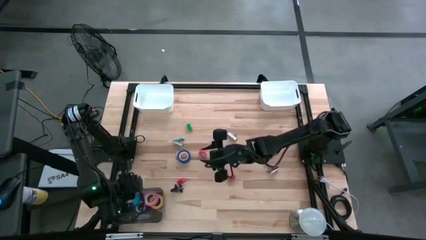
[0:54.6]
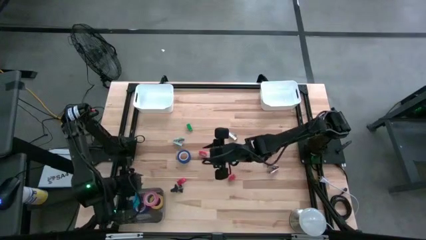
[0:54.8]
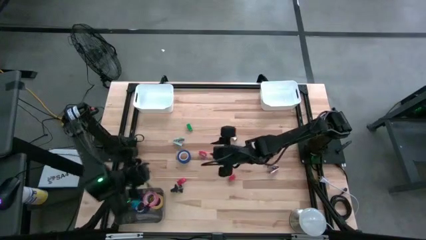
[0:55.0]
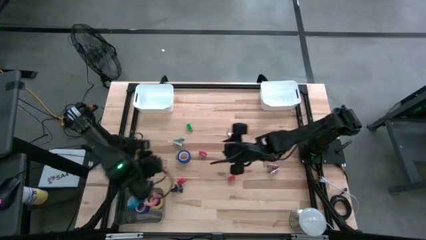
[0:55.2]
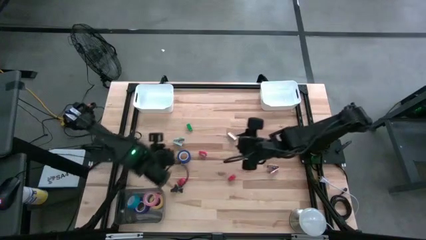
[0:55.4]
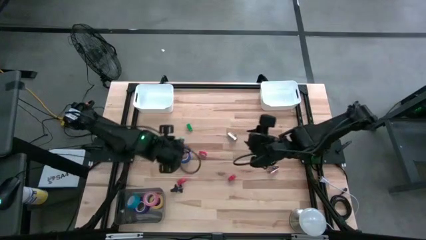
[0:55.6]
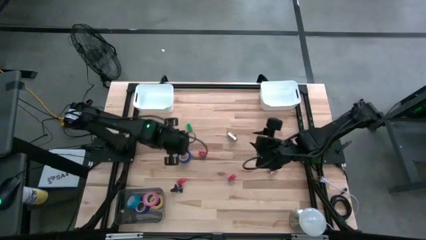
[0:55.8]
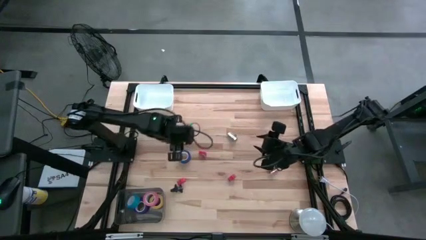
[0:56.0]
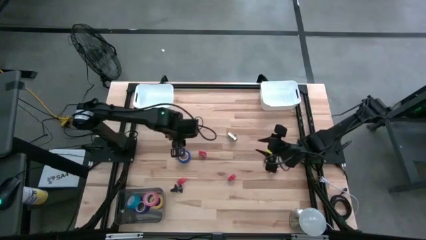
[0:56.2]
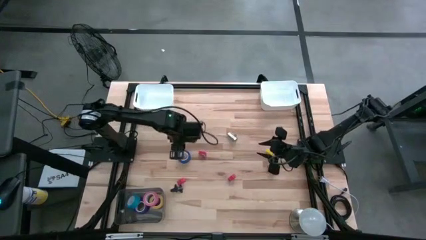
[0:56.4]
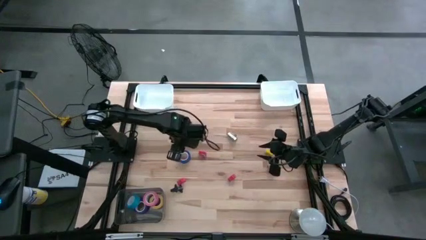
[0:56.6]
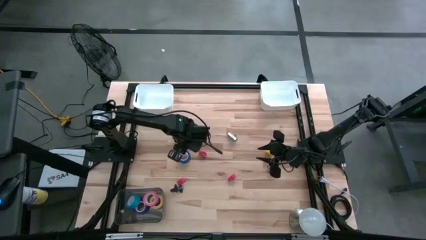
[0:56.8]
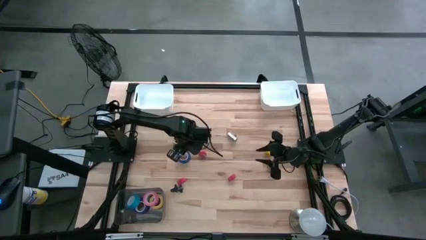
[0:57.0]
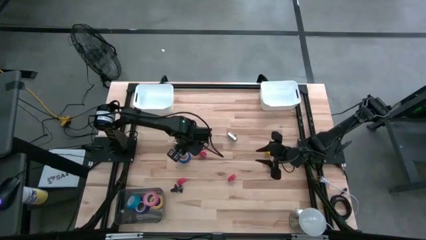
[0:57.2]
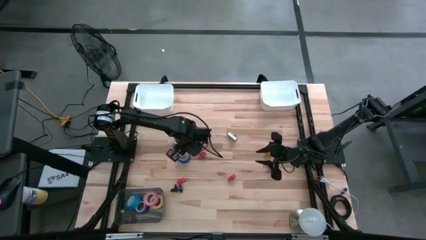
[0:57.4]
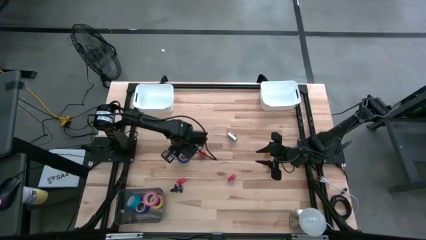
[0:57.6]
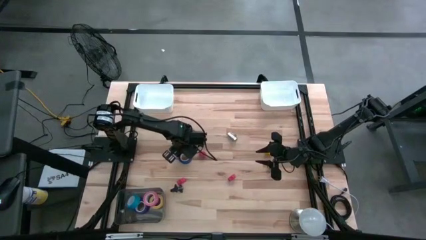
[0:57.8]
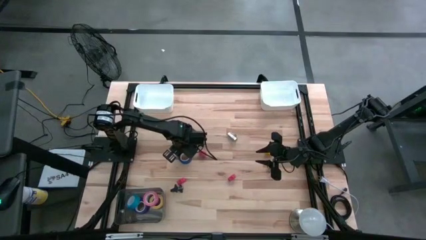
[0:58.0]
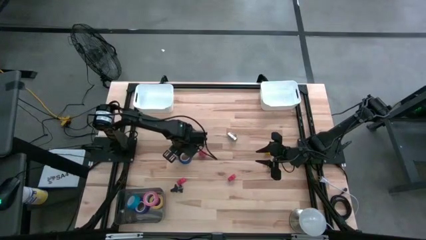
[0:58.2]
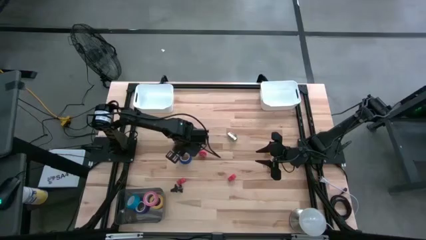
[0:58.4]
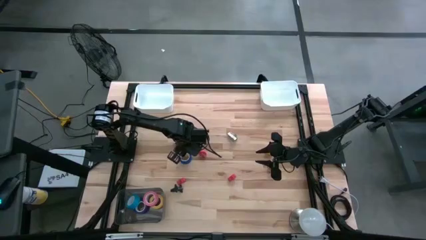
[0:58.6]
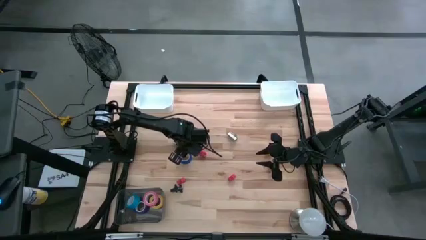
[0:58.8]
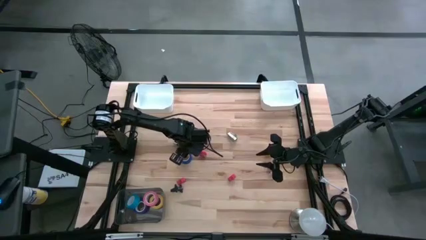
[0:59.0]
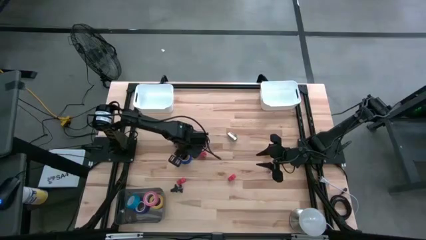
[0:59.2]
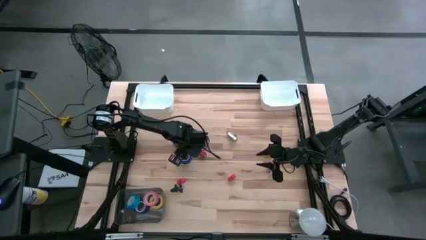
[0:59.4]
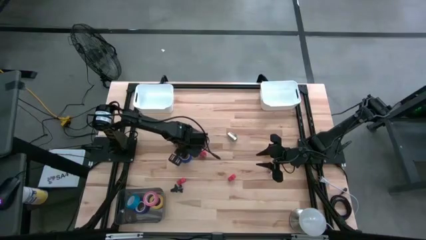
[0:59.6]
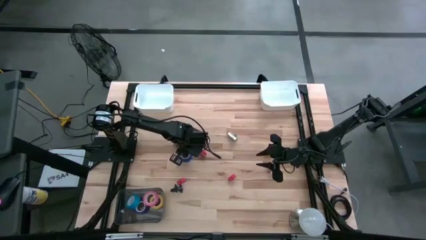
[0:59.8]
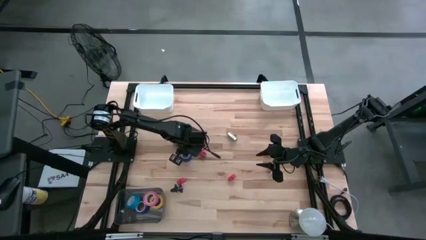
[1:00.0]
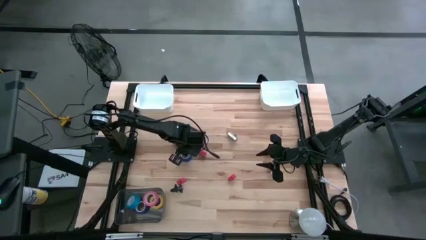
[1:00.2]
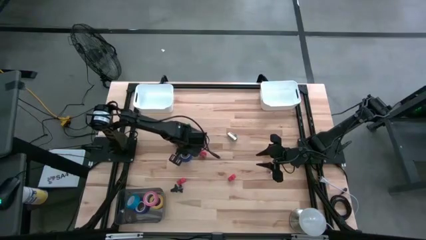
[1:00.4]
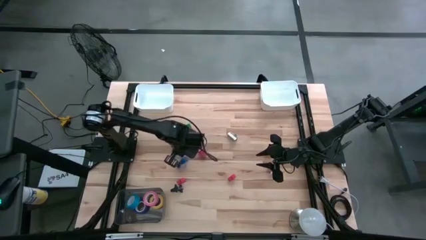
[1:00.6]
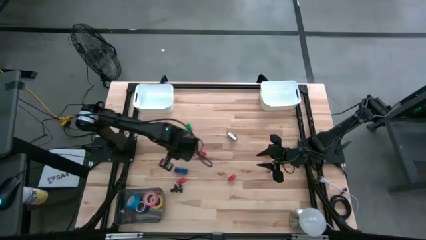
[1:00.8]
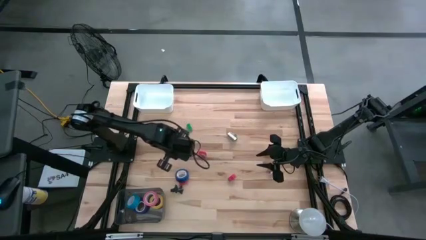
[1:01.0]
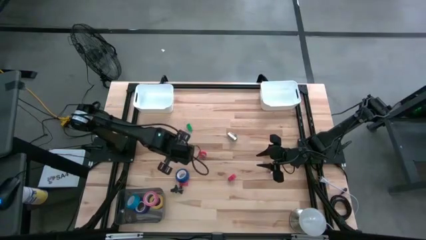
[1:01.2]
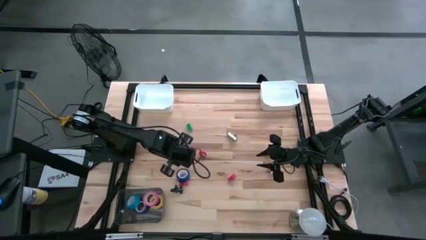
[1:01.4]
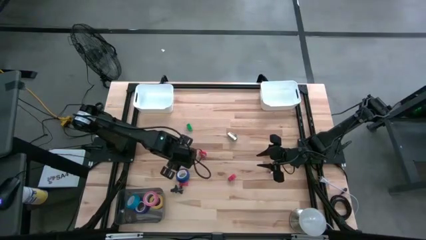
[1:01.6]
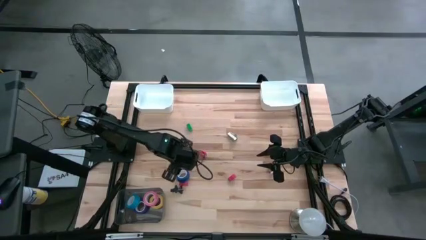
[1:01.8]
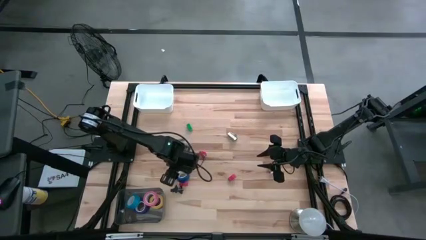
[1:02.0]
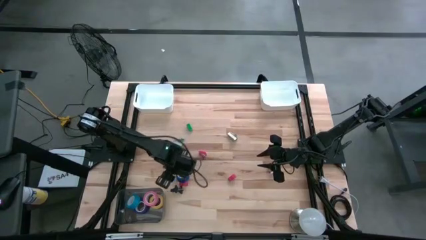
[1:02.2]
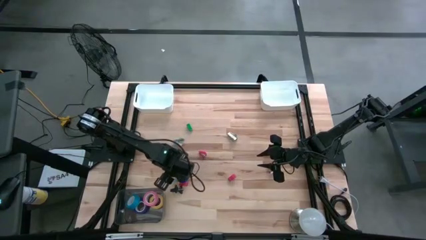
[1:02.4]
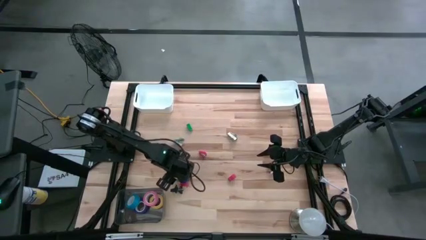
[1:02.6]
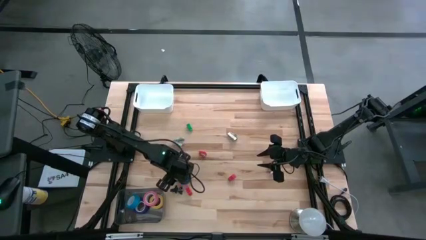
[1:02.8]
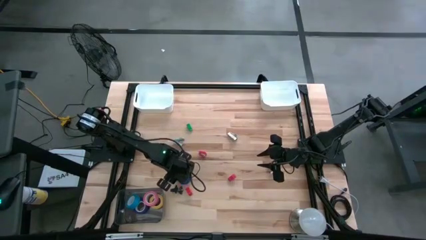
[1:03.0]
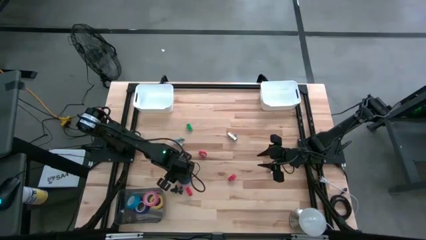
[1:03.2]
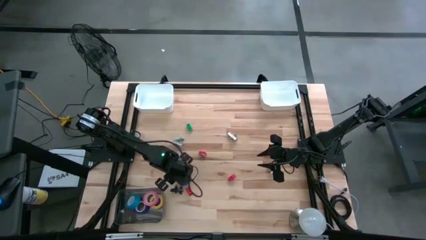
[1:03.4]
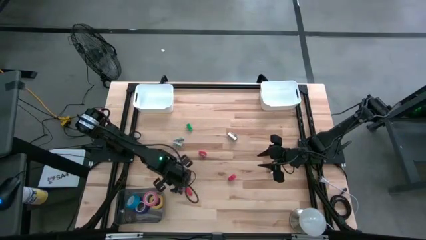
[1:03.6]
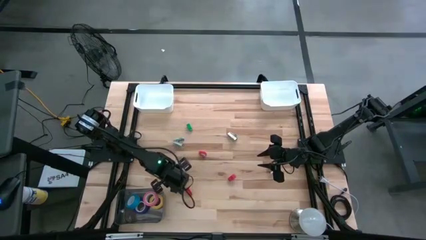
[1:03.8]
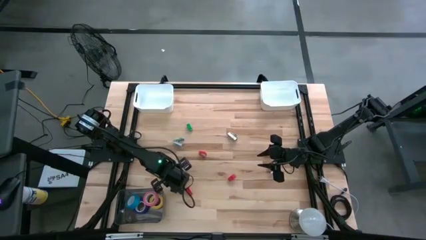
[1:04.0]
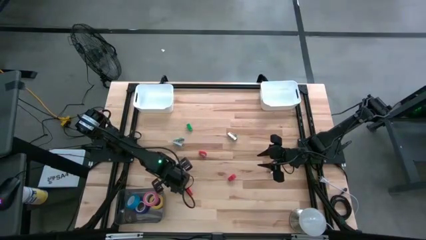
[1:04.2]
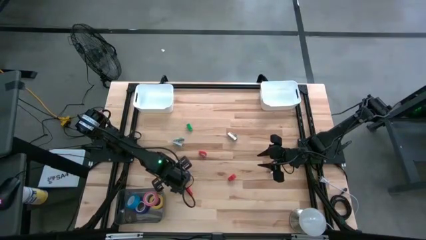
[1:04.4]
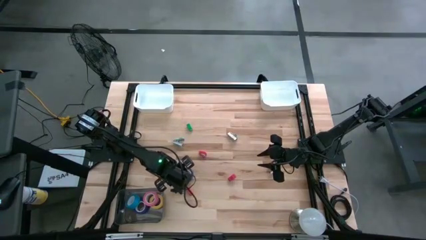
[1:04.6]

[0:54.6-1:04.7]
Task: Pick and place Stapler, Stapler remover, tape
Put the dark blue tape into the black bin

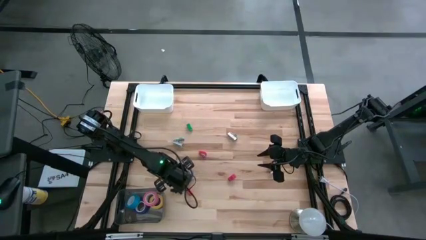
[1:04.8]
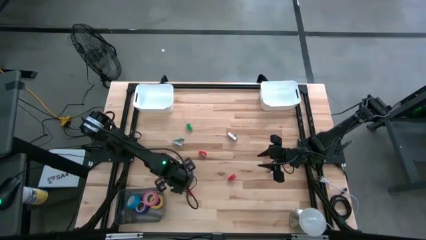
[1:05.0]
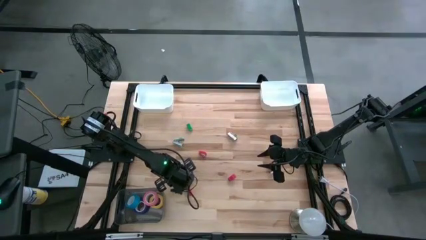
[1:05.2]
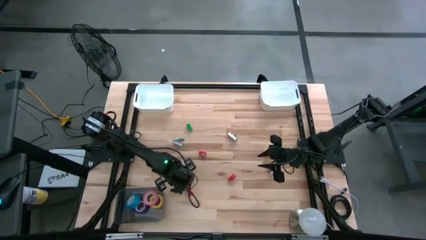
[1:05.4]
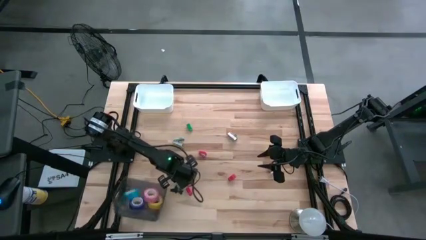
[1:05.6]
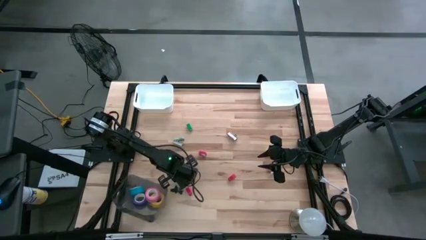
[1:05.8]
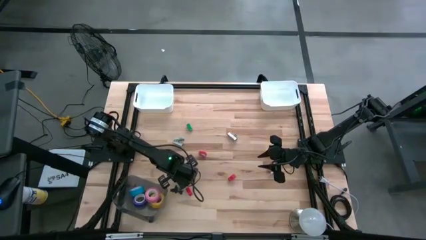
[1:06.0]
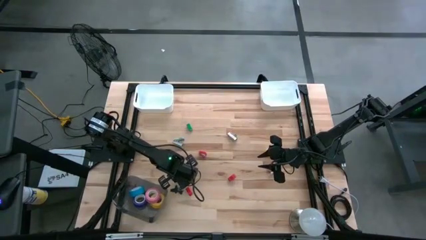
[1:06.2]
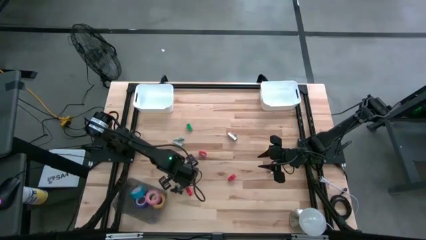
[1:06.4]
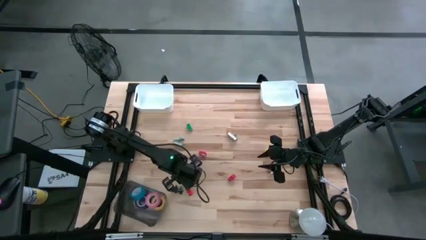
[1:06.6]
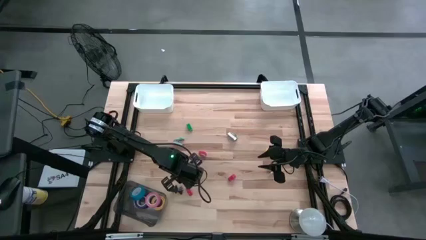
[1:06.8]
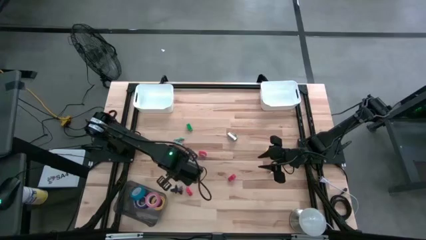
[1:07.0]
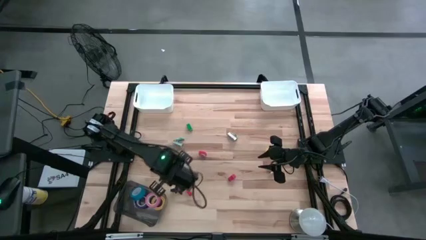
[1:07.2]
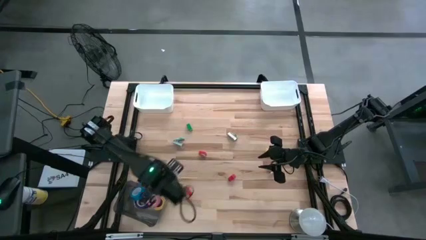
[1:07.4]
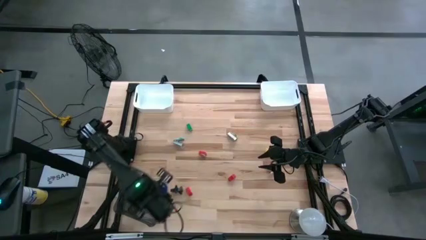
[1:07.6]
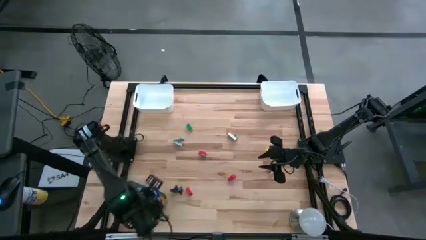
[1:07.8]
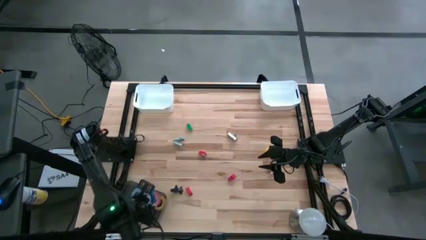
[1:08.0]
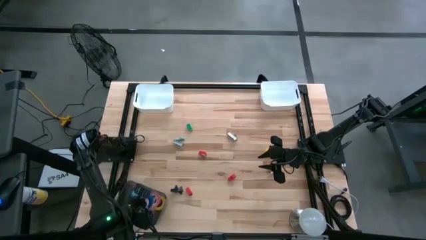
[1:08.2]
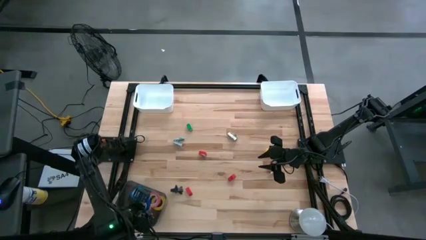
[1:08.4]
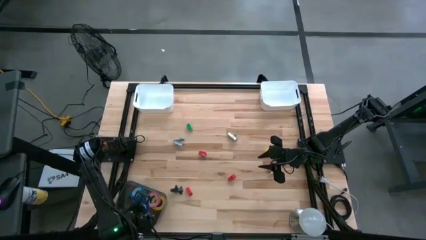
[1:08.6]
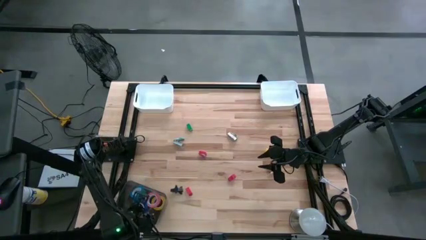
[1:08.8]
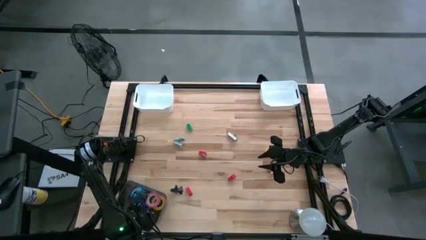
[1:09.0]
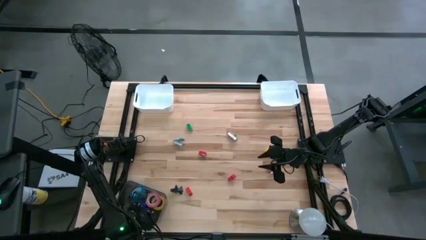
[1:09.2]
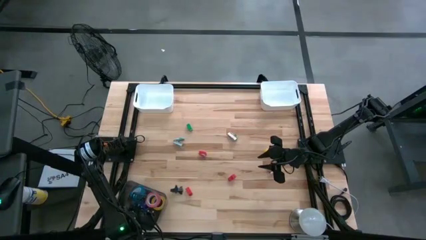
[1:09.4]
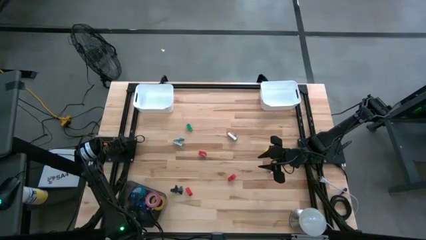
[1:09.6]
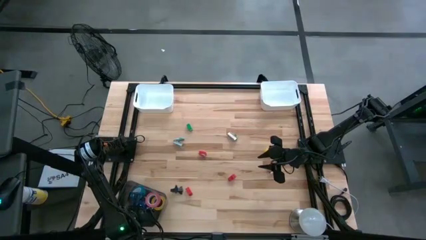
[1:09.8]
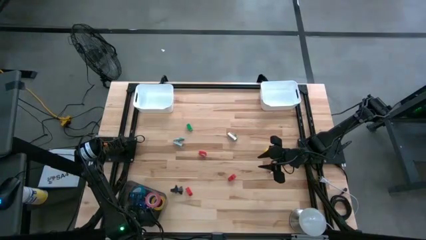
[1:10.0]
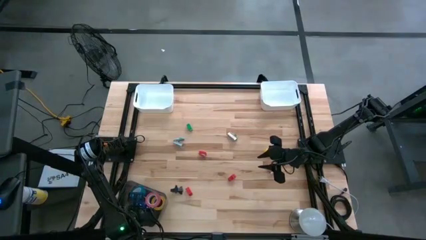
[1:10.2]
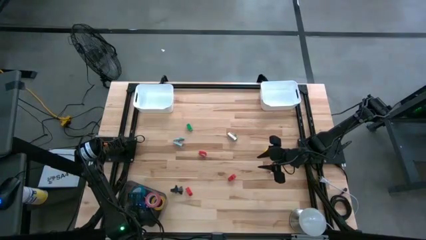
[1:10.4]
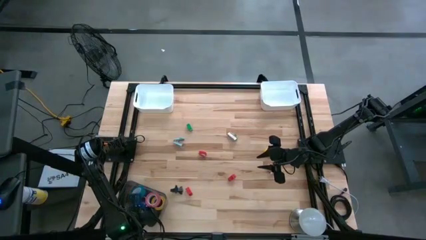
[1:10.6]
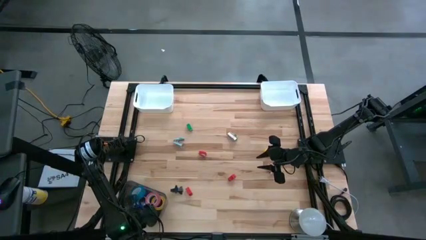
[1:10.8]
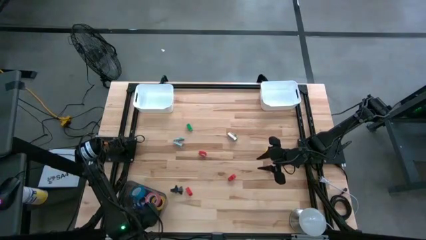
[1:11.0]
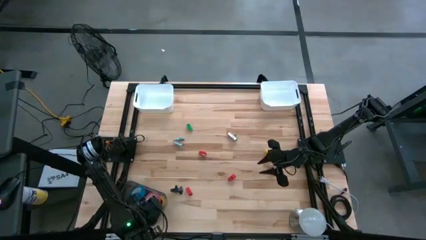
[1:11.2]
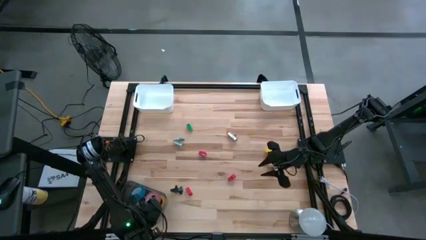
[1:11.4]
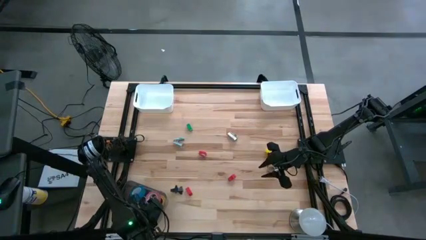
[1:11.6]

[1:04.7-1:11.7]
Put the dark blue tape into the black bin
